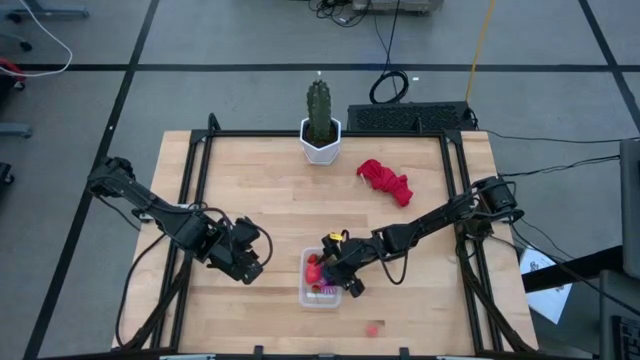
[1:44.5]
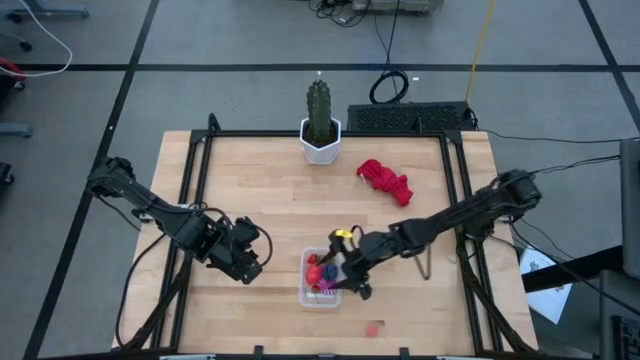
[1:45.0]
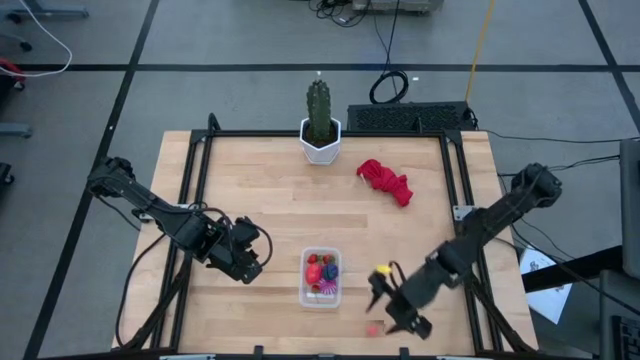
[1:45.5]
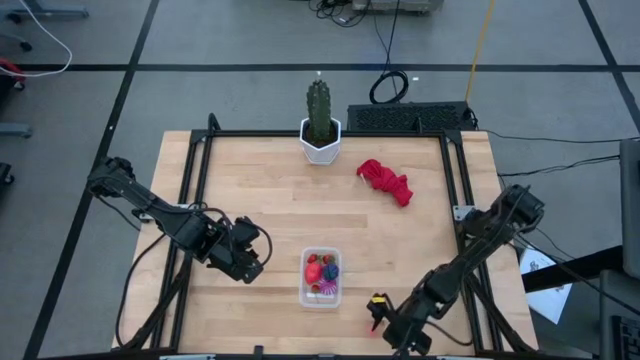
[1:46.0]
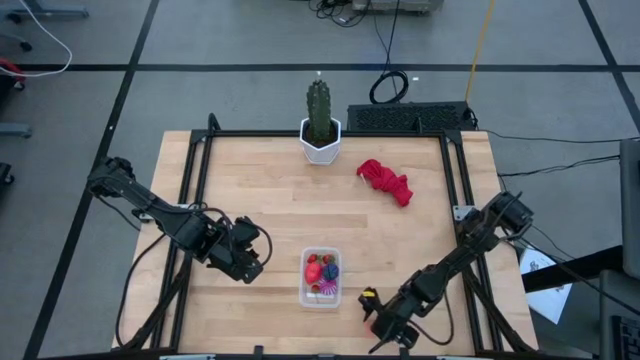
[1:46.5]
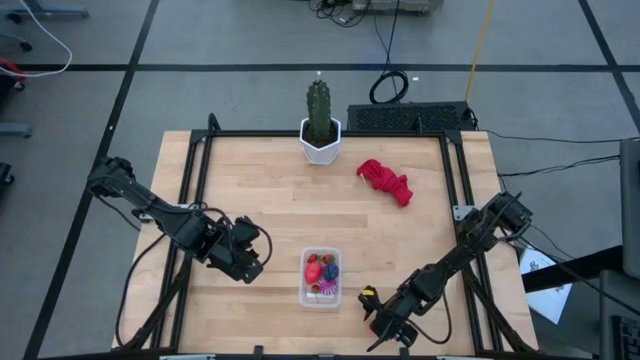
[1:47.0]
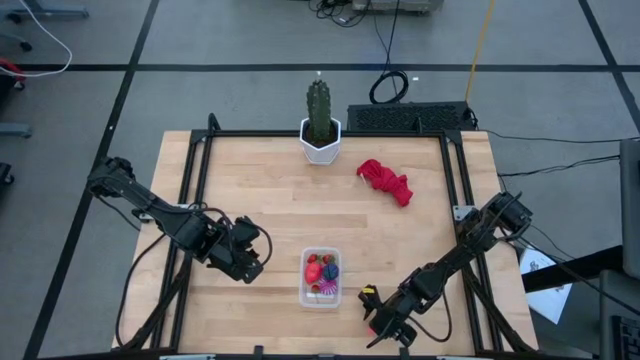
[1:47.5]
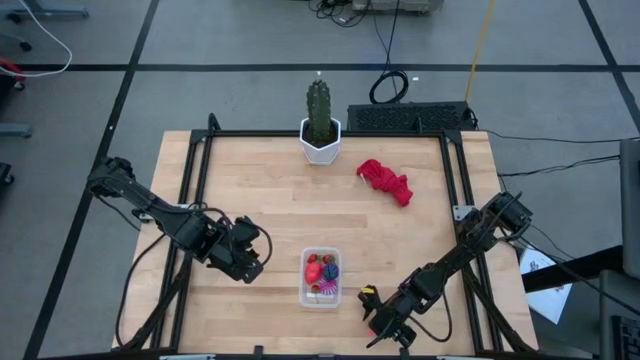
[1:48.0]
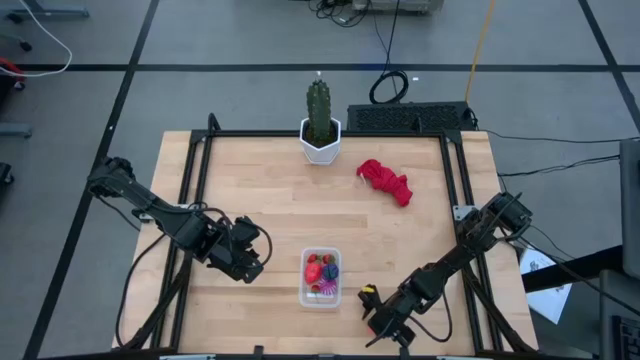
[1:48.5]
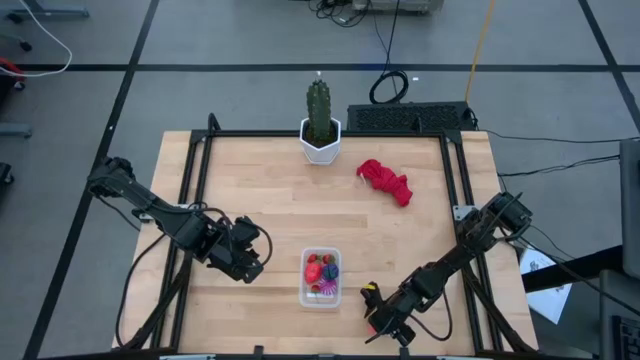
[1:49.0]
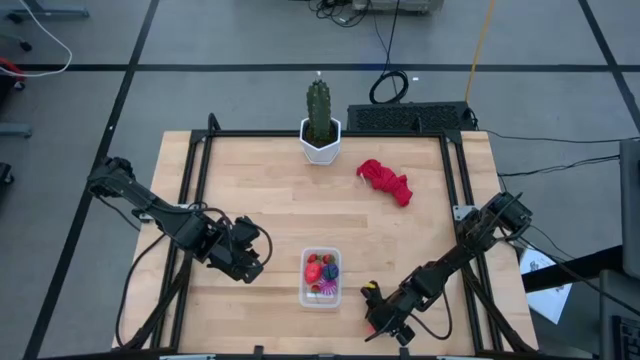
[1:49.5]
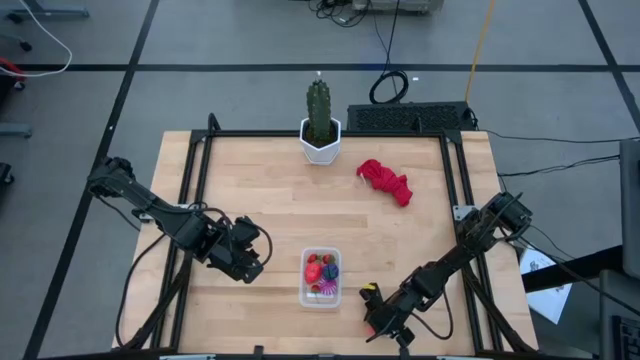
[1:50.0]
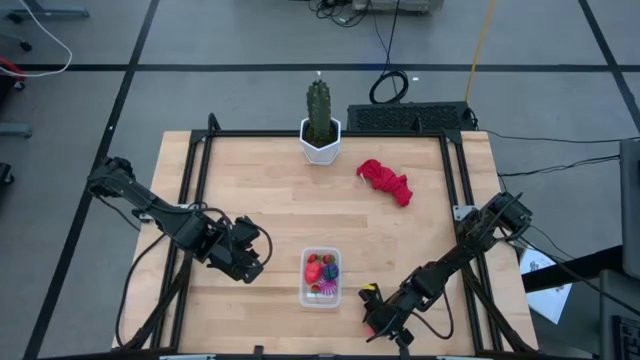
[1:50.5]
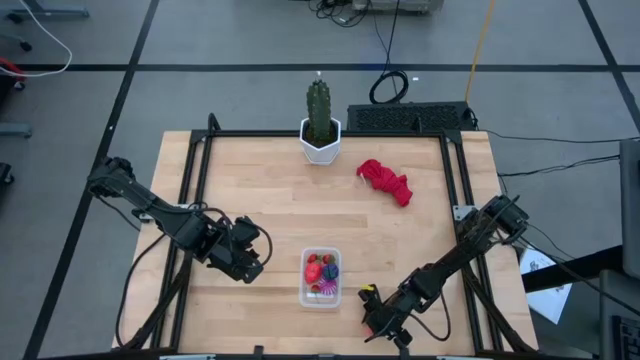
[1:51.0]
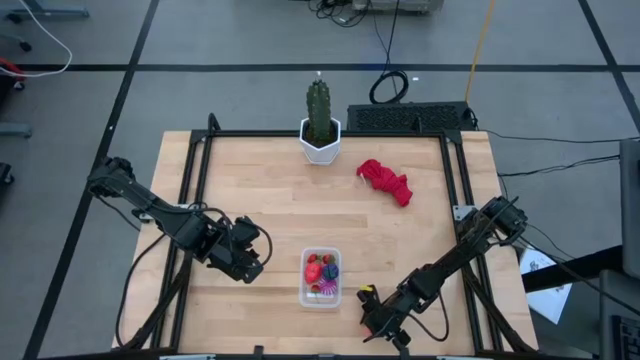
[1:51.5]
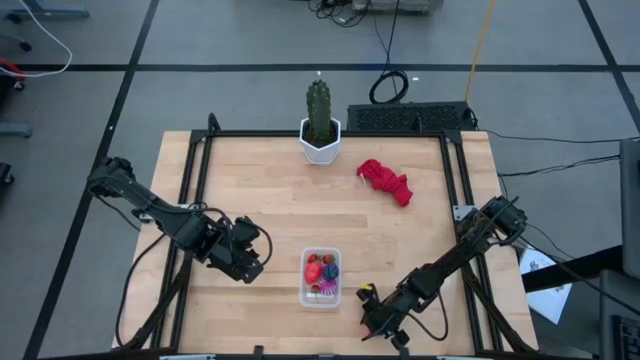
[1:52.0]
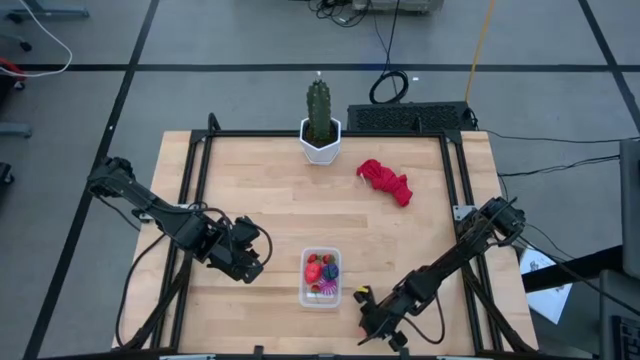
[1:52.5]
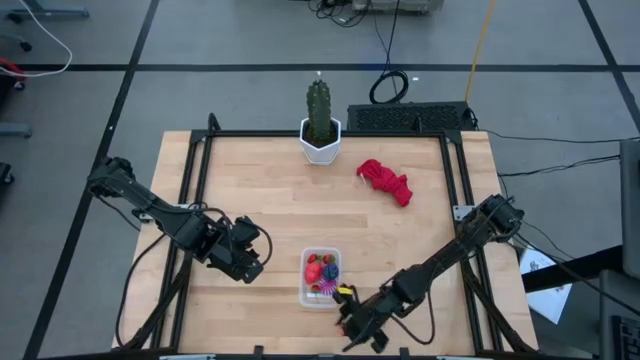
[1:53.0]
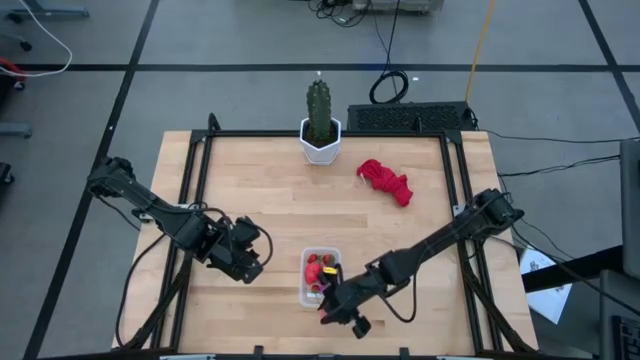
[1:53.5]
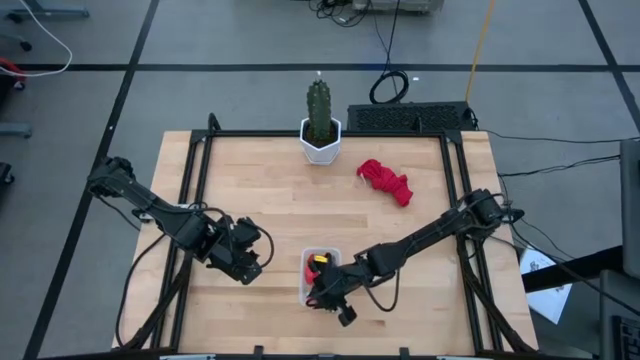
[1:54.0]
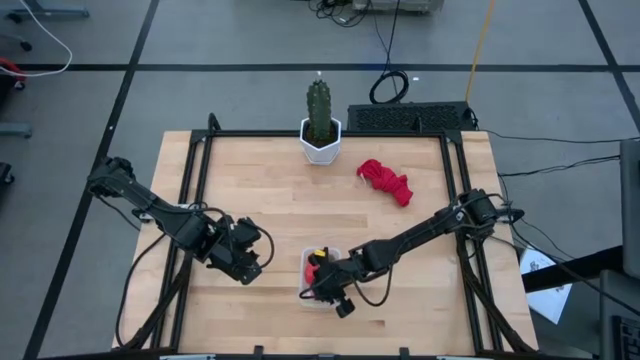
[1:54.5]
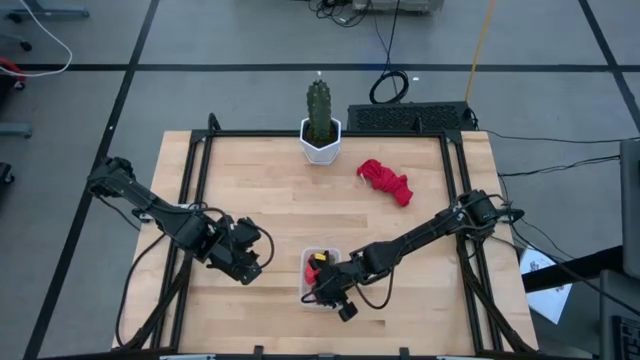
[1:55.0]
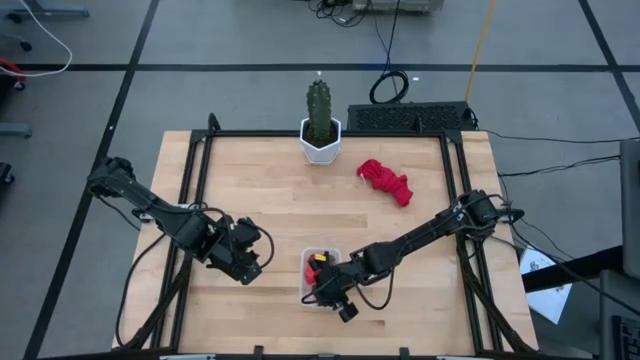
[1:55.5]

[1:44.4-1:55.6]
Task: Pick and placing Produce into tupperware
Put the peach into the transparent container

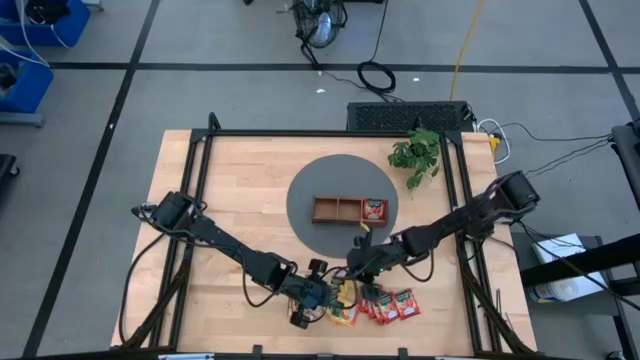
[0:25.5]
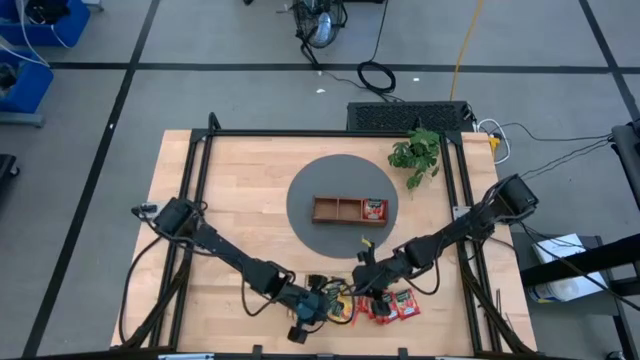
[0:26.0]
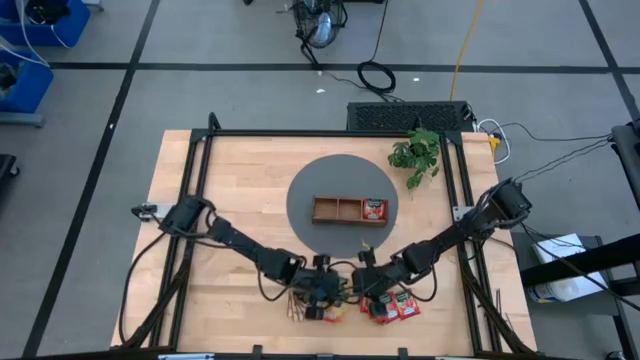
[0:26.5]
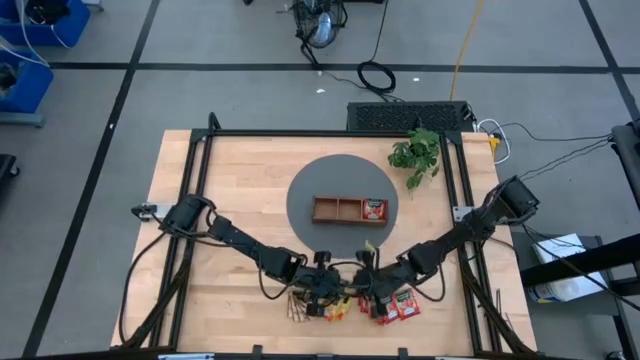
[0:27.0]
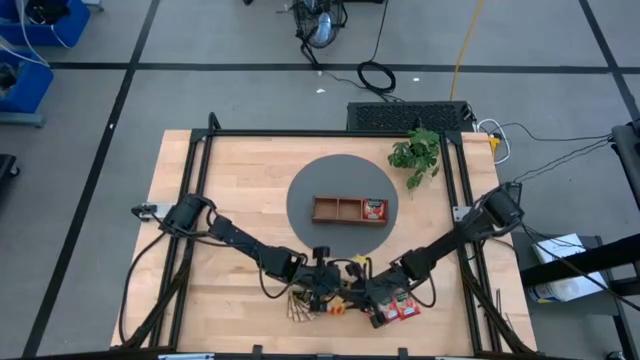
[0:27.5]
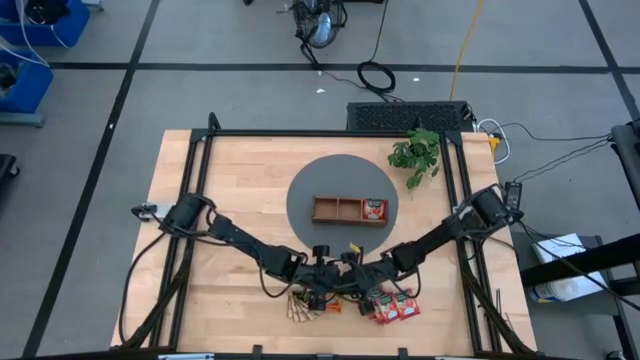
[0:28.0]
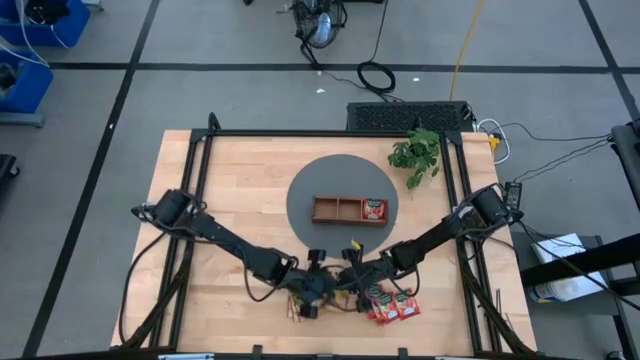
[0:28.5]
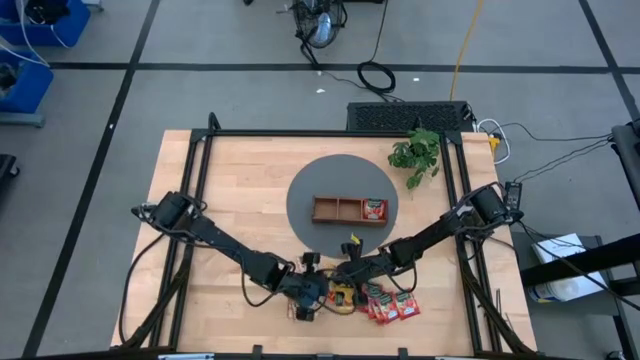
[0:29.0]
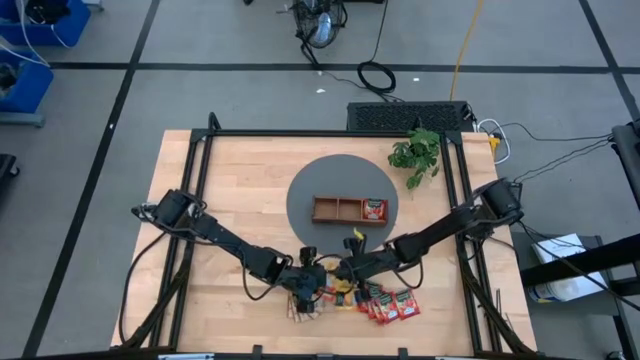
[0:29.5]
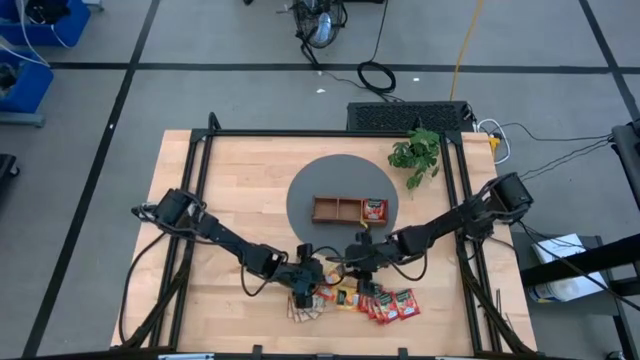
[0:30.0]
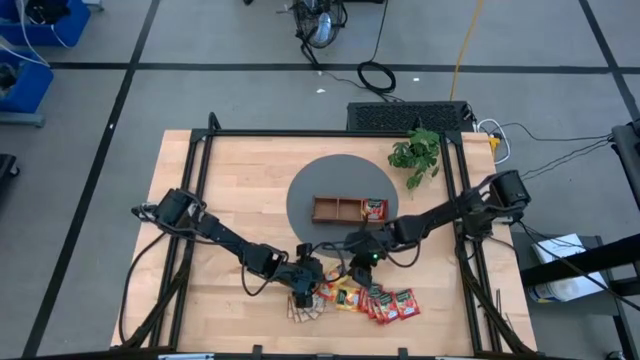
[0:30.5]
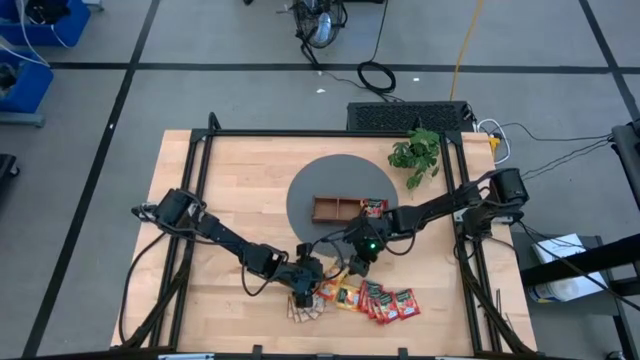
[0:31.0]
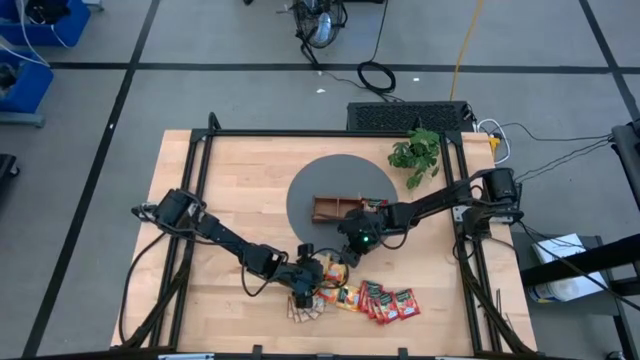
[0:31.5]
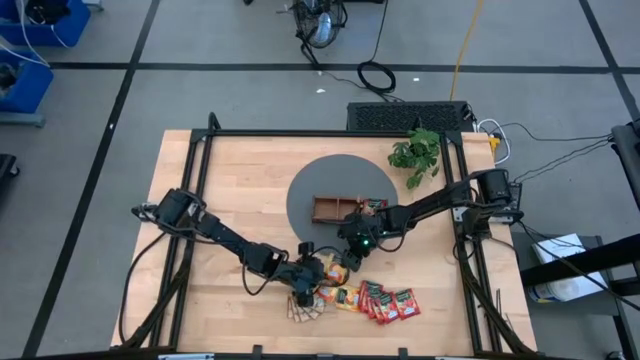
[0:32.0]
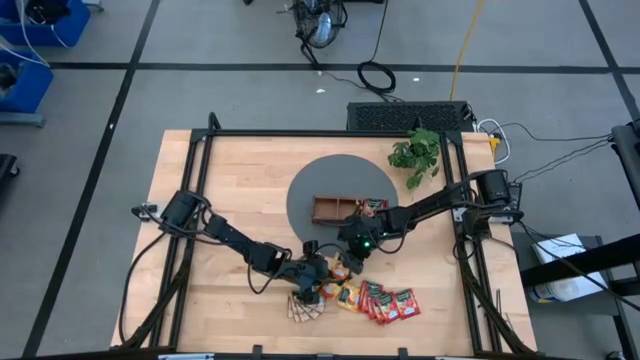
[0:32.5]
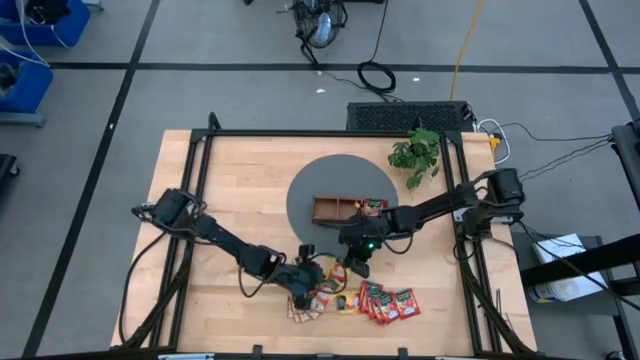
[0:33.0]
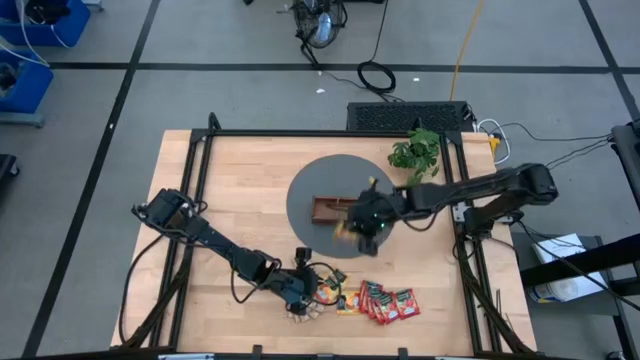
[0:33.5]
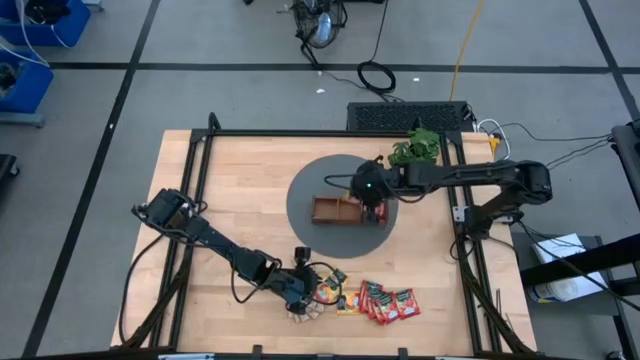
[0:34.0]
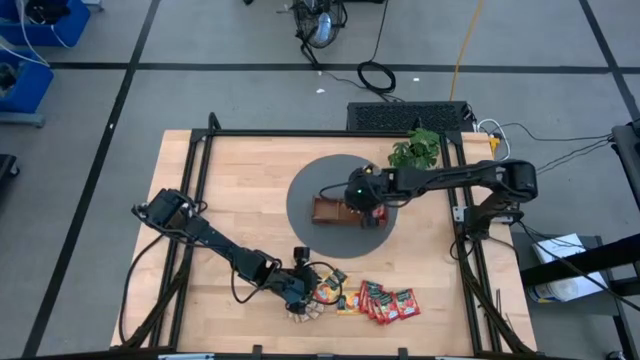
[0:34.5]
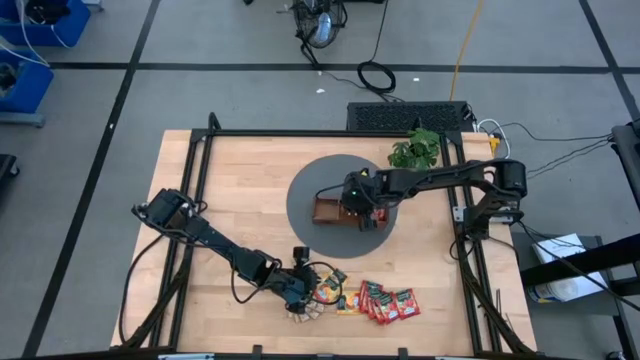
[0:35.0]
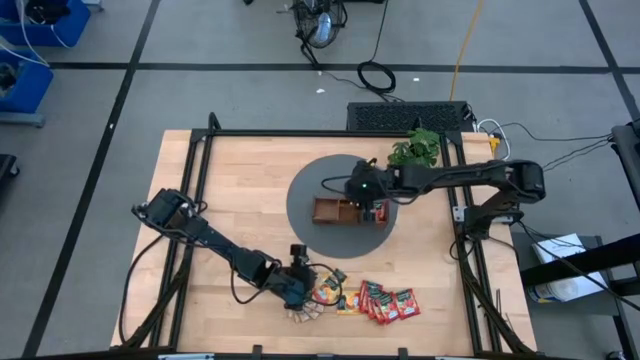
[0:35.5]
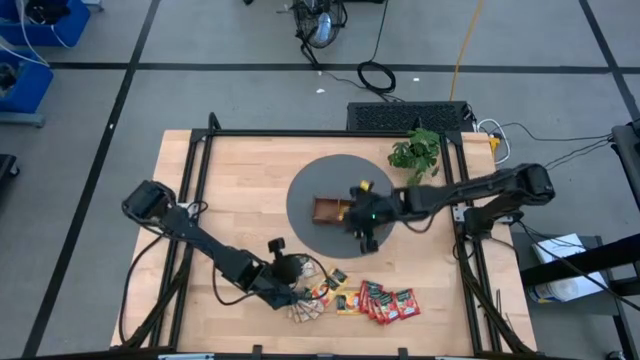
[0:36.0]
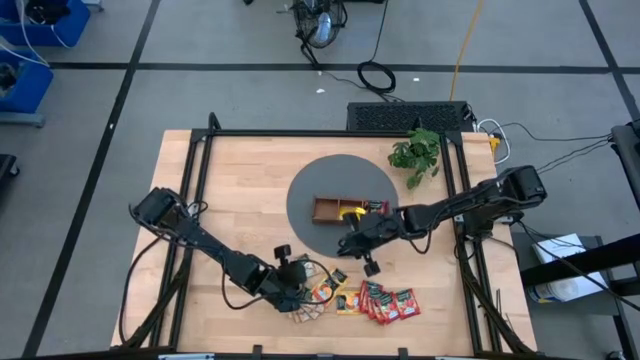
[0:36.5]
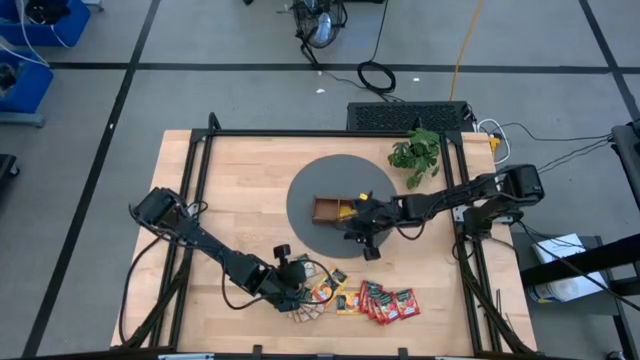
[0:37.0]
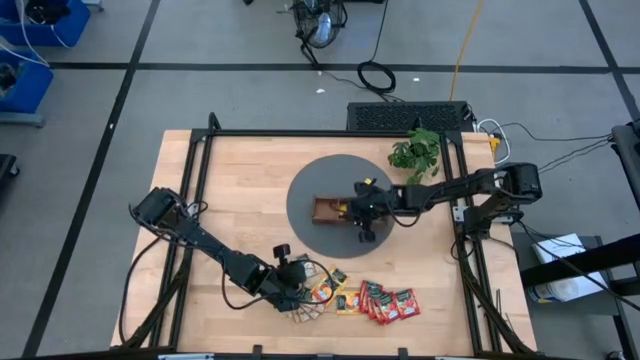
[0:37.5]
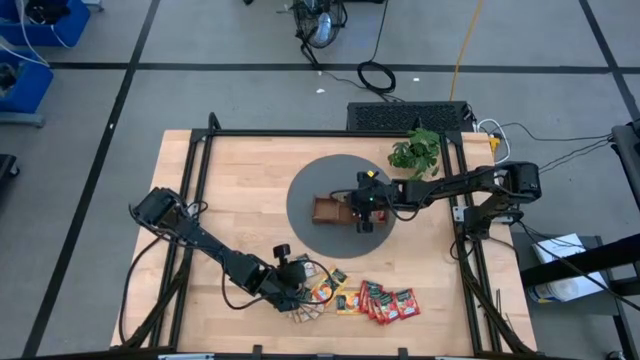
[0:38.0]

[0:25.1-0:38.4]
Task: Pick & Place Tea
Put the yellow tea bag to the middle section into the wooden organizer
